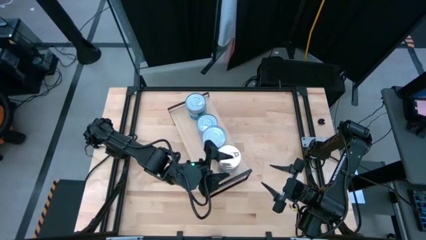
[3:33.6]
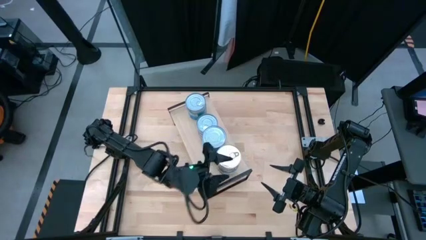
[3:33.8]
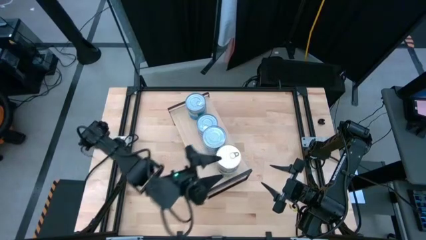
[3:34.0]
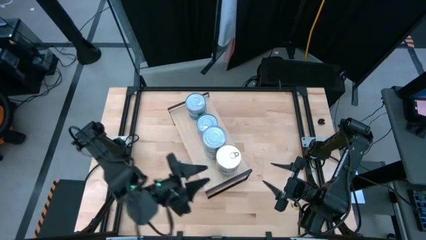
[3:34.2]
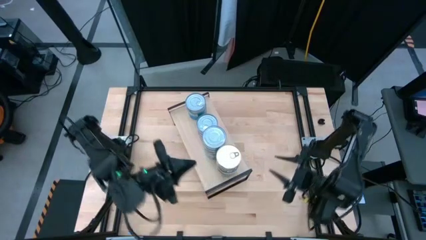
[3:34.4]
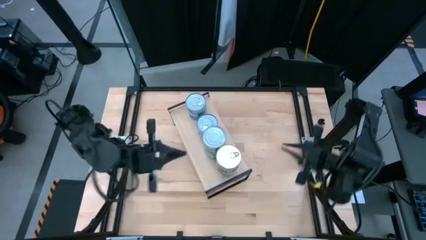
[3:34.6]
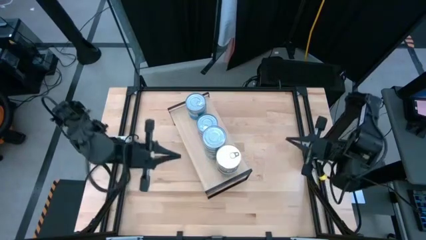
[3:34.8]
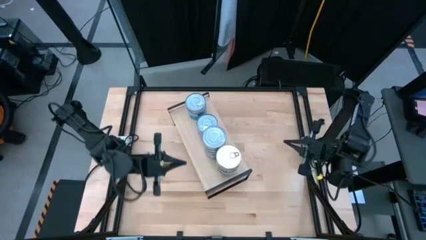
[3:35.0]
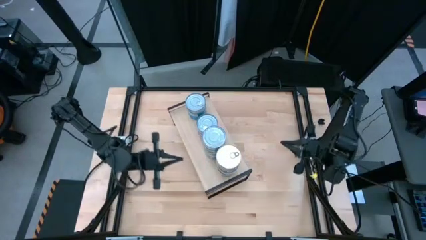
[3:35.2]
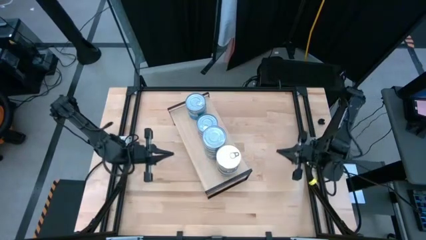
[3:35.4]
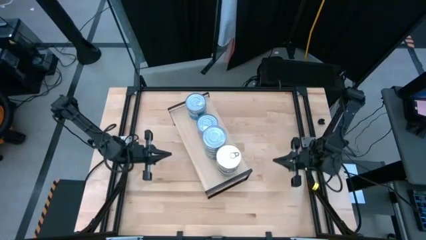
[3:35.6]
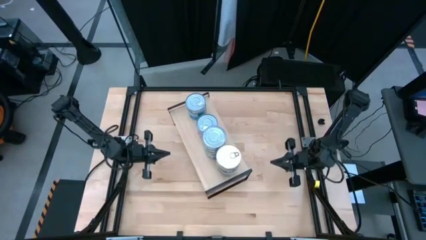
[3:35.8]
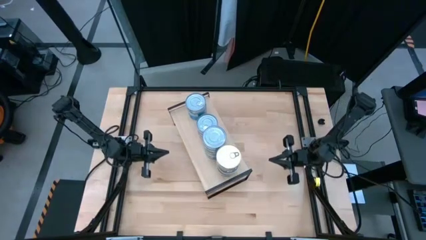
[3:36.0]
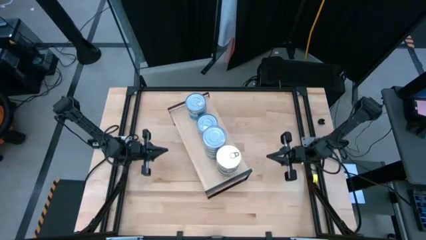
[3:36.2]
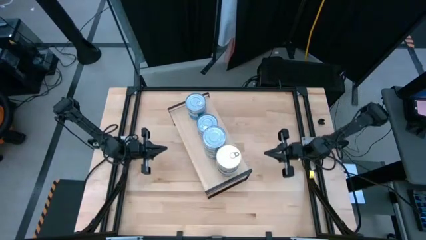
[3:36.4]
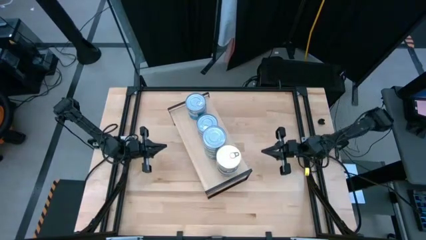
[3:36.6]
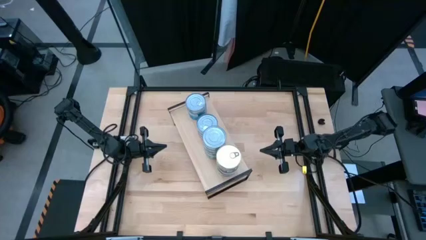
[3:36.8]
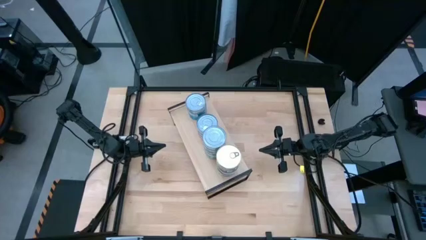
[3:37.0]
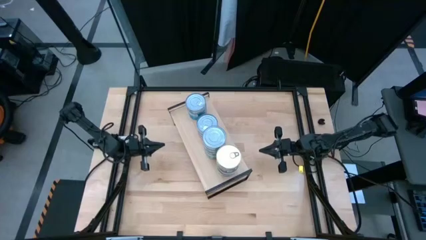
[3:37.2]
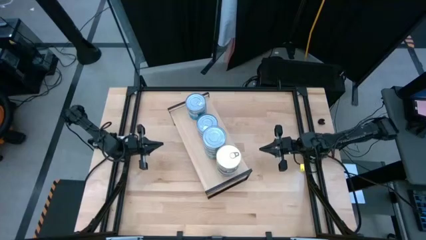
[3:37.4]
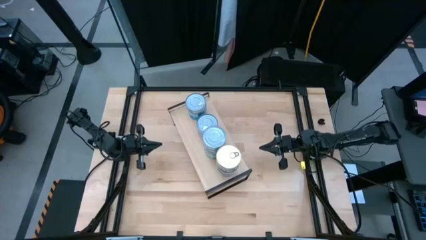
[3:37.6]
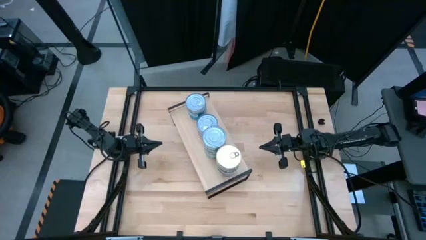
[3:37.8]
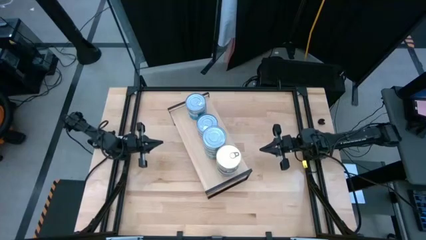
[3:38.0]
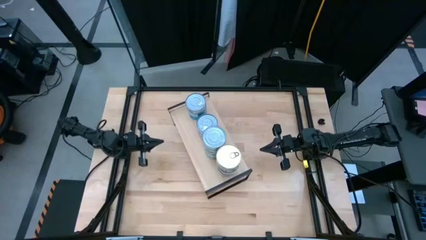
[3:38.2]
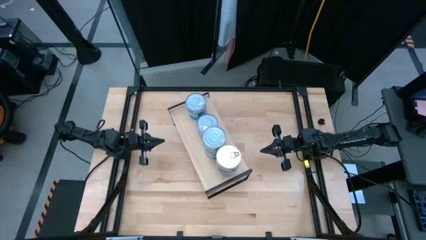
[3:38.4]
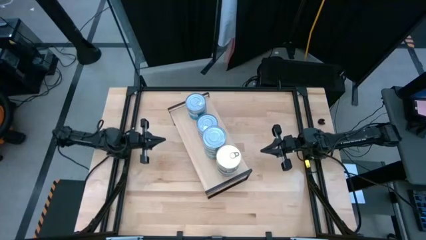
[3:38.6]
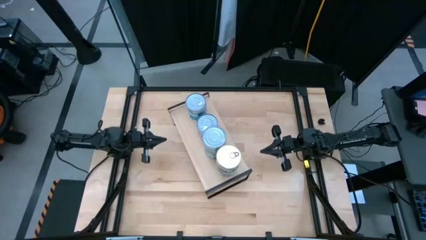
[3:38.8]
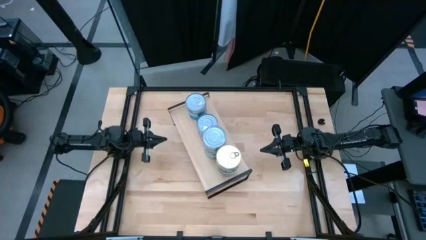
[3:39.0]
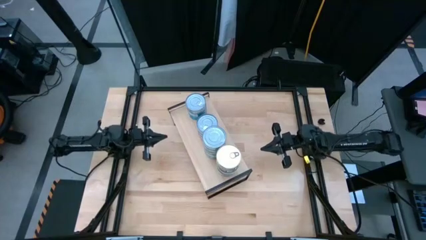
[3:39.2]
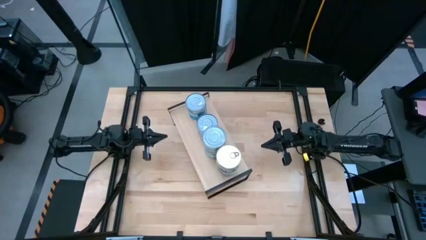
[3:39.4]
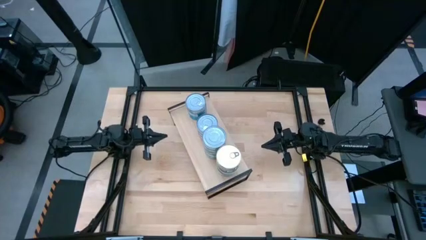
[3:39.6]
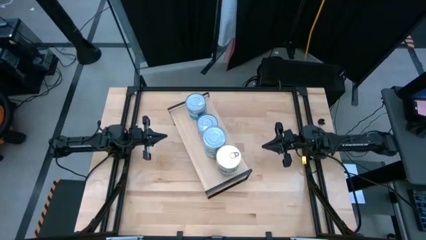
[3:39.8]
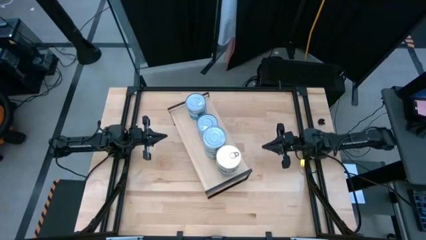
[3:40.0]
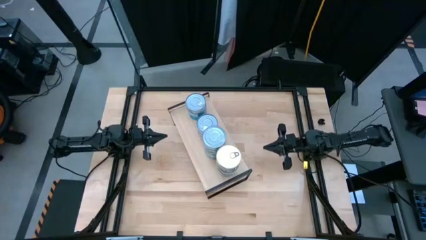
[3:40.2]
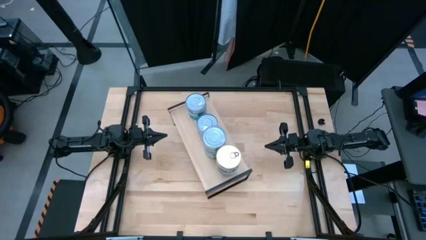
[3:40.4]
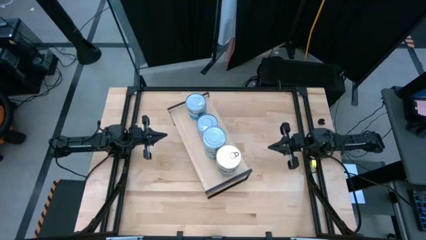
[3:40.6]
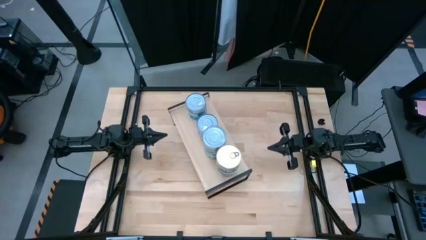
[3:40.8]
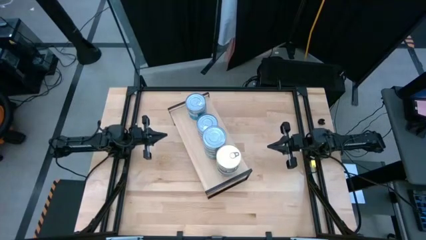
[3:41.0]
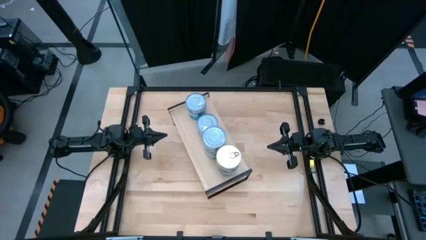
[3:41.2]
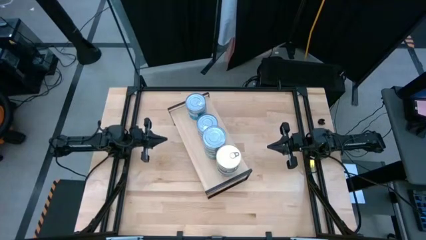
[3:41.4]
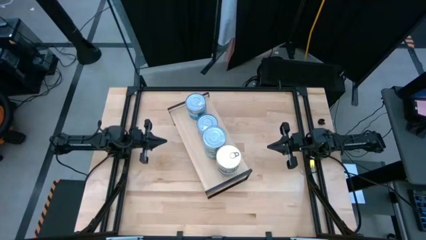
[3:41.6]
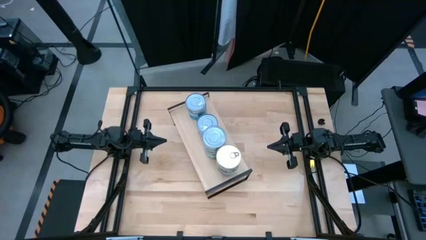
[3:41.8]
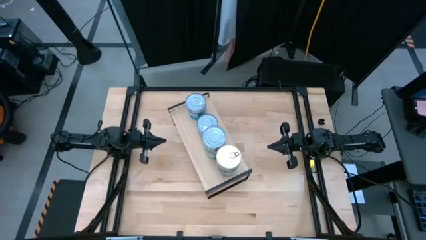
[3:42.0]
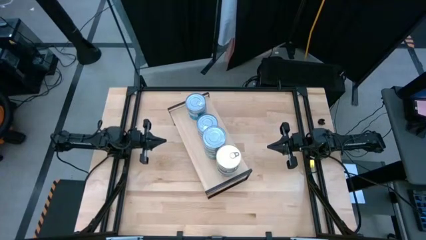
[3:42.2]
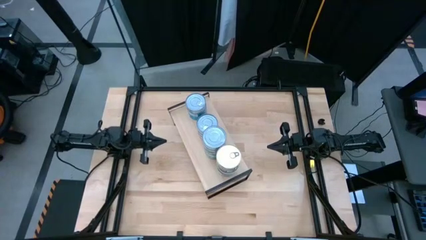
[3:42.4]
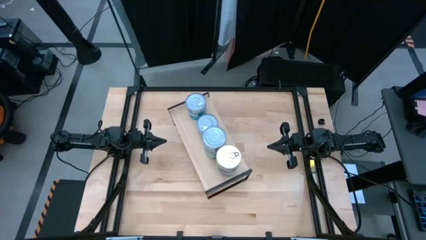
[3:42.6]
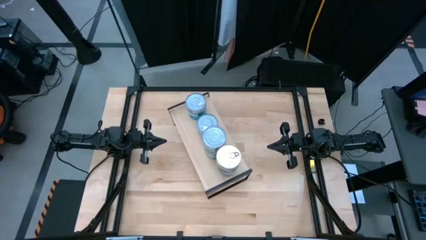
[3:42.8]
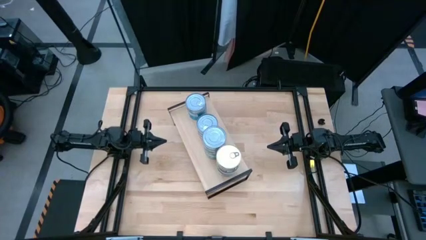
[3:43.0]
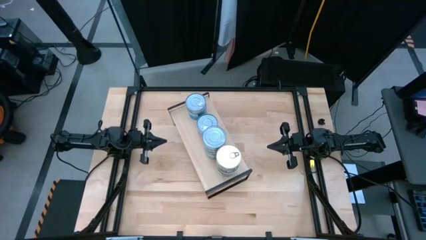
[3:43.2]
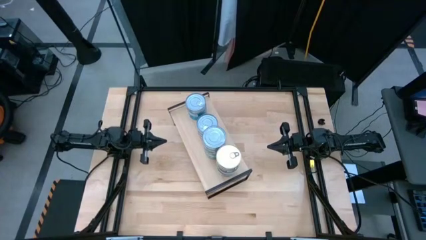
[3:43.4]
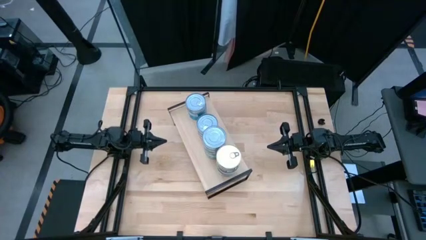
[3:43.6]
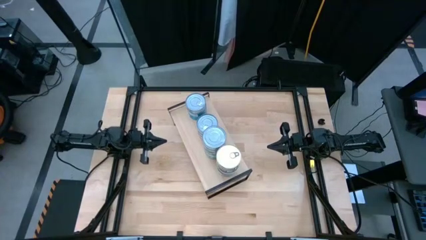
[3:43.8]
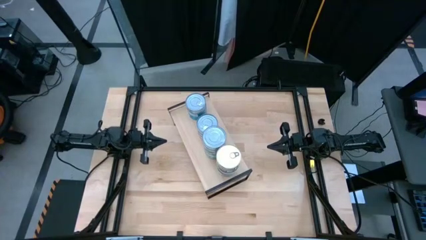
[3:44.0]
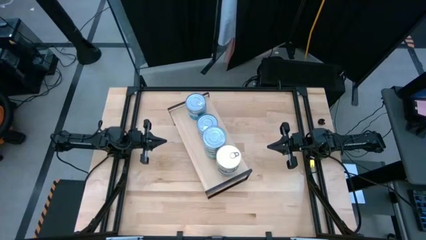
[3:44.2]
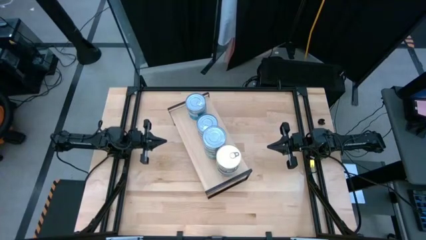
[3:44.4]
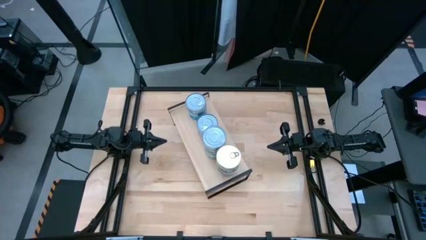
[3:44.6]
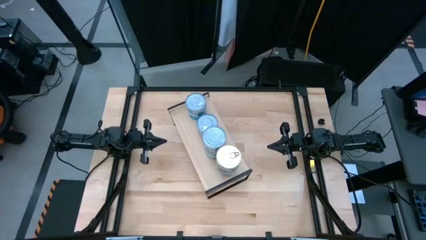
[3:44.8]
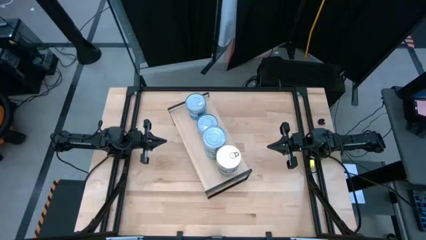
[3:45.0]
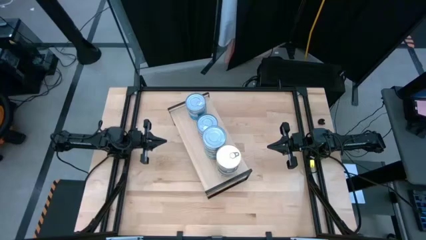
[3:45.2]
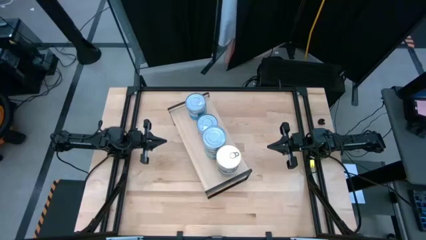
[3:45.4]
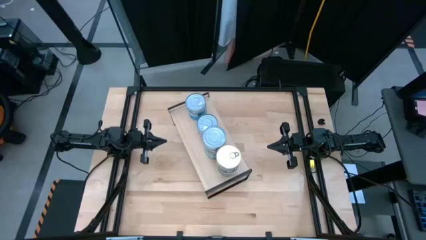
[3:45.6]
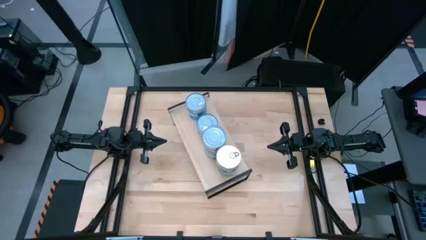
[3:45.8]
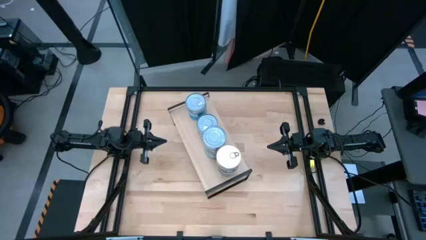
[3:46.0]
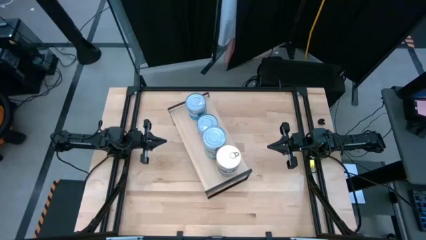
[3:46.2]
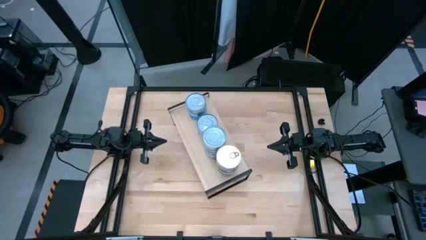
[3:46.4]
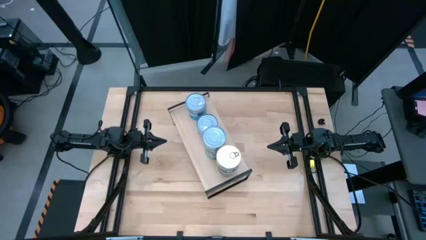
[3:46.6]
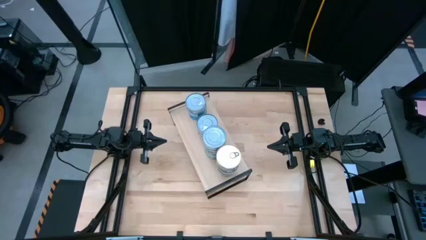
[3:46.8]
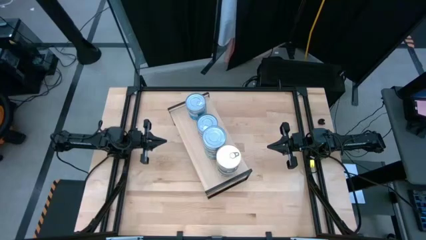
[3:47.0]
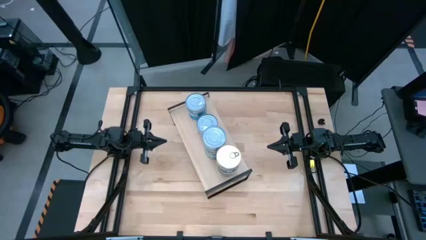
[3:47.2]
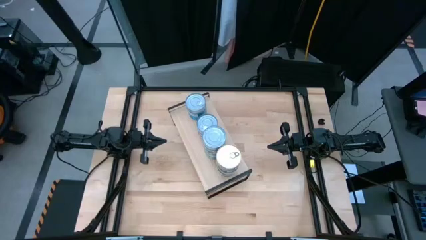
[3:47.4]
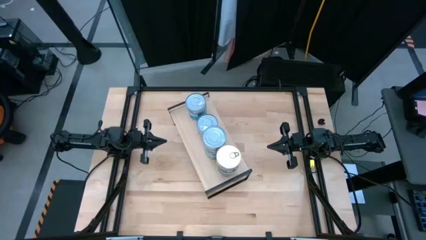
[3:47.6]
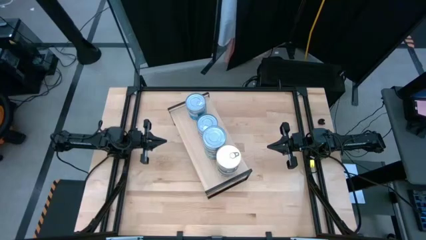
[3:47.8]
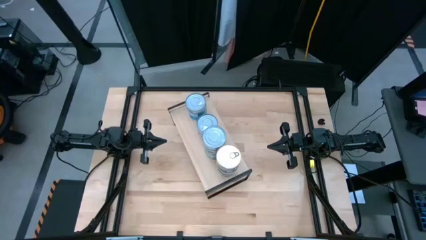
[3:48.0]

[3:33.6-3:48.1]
Task: Stack canned seafood by type on shelf
Return to Home Position
